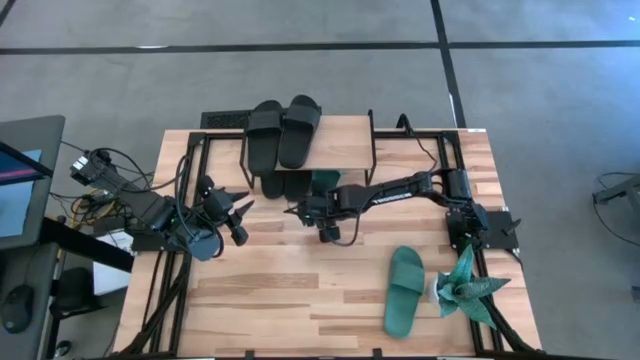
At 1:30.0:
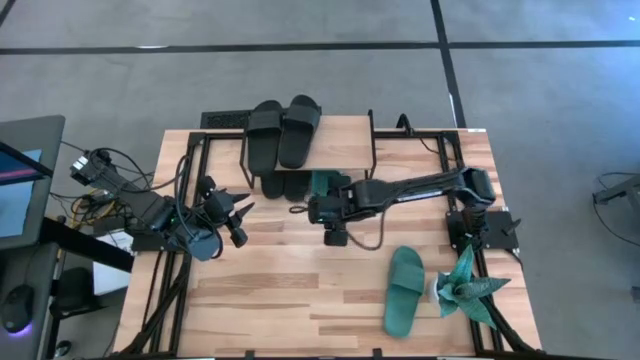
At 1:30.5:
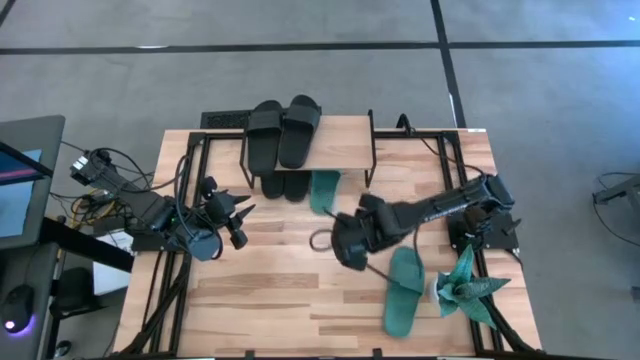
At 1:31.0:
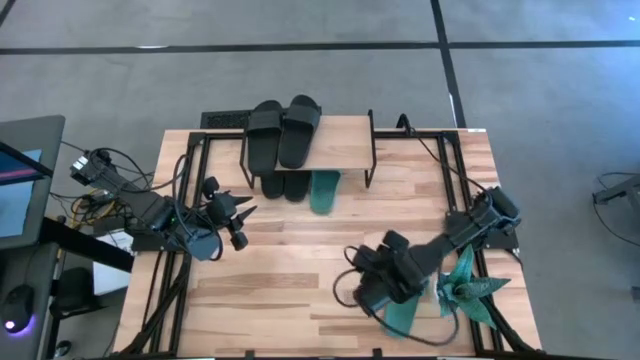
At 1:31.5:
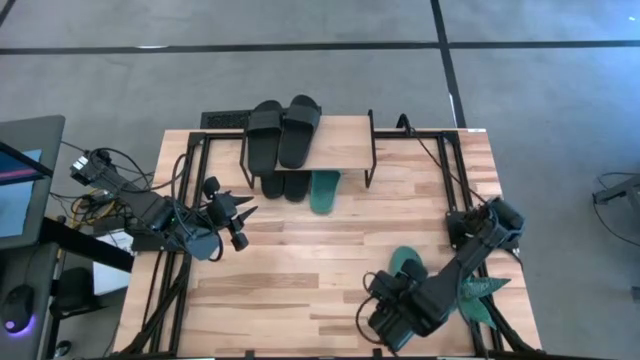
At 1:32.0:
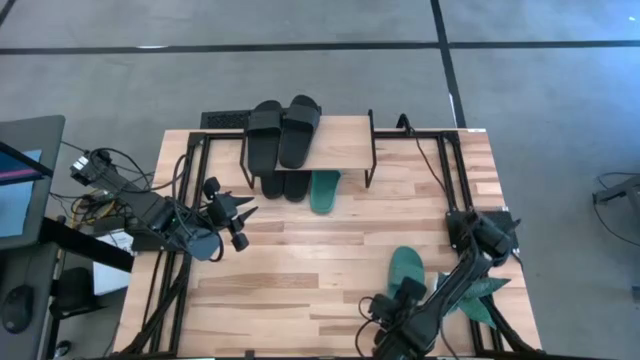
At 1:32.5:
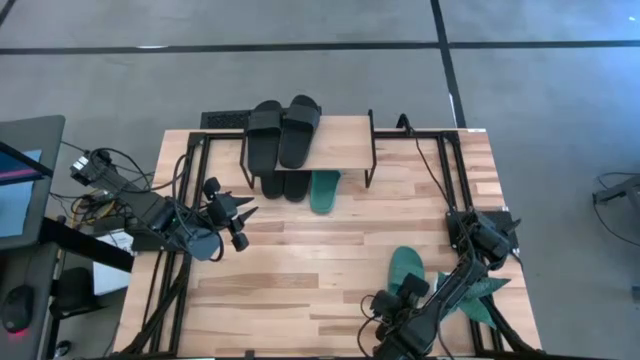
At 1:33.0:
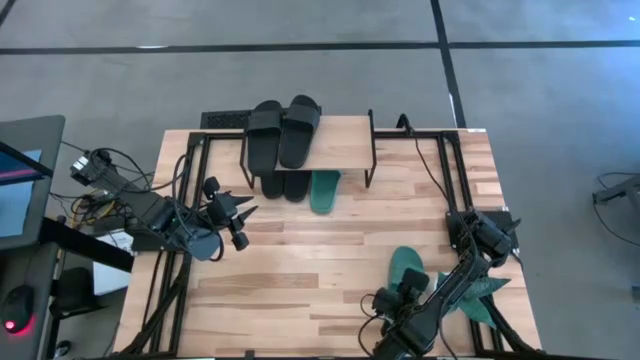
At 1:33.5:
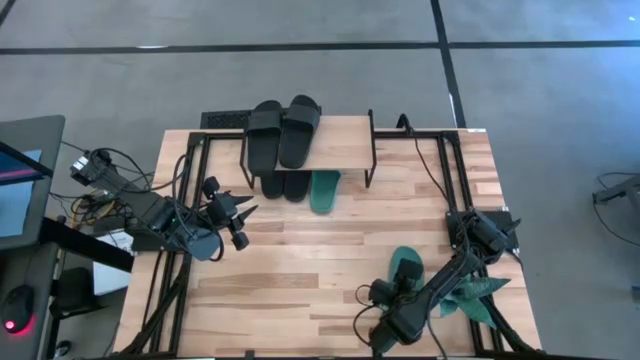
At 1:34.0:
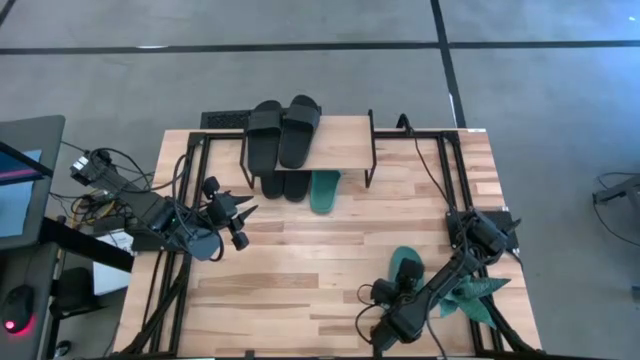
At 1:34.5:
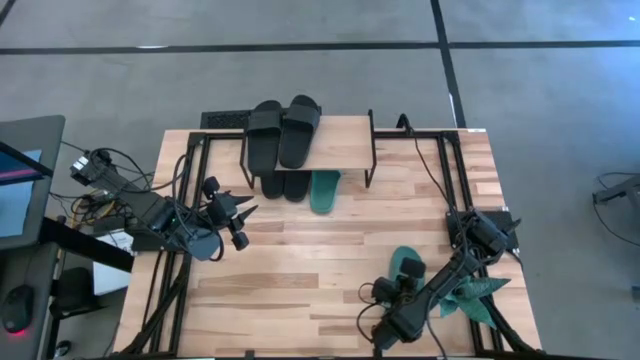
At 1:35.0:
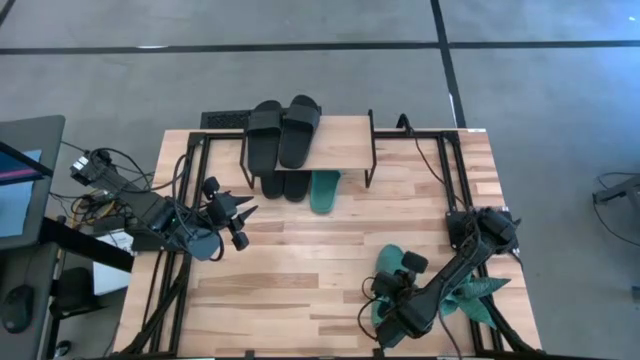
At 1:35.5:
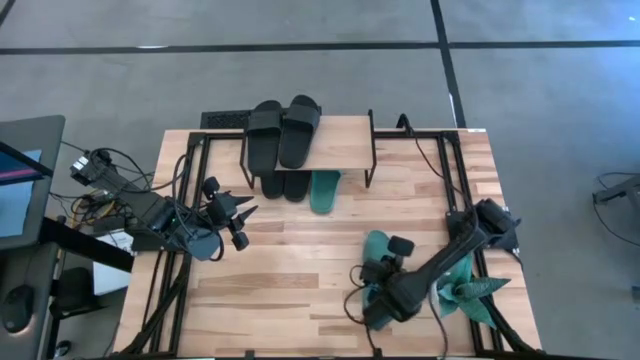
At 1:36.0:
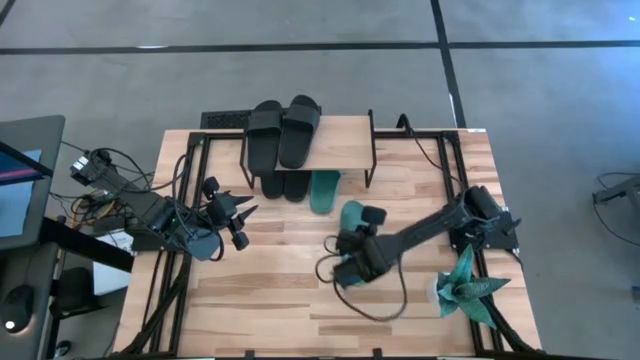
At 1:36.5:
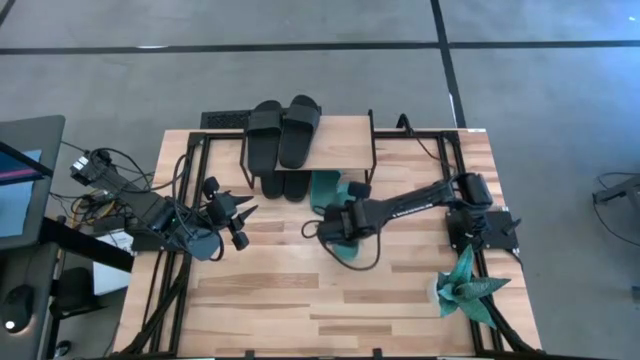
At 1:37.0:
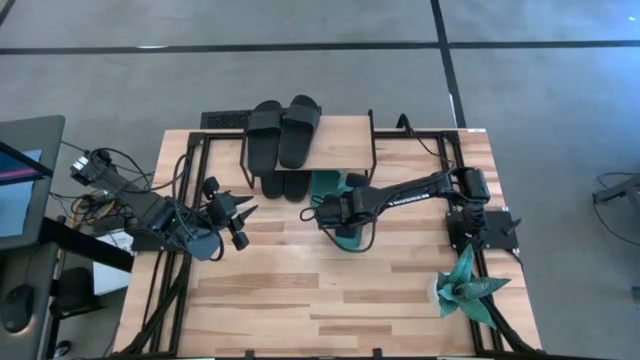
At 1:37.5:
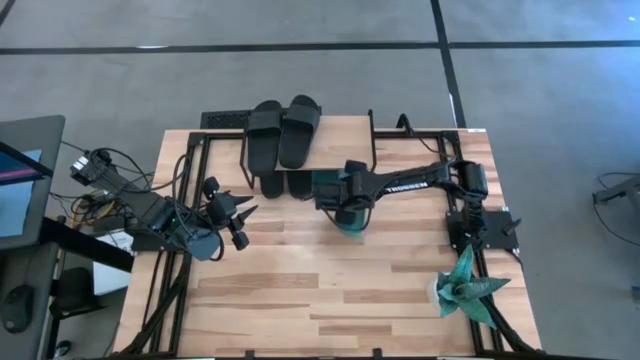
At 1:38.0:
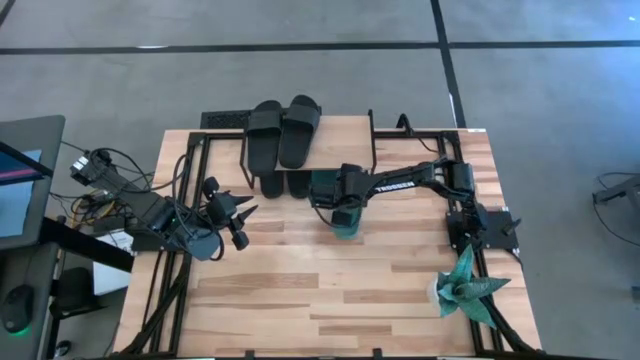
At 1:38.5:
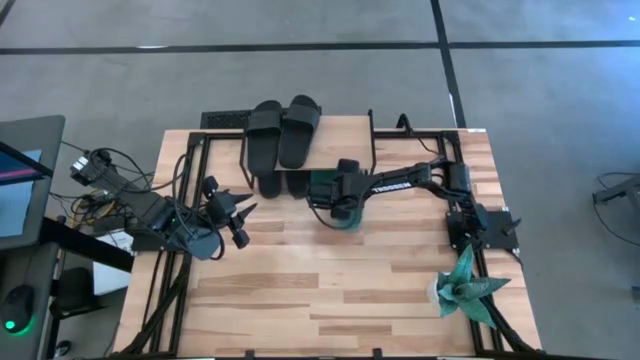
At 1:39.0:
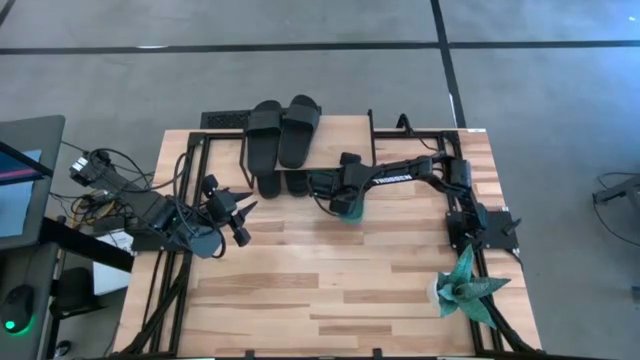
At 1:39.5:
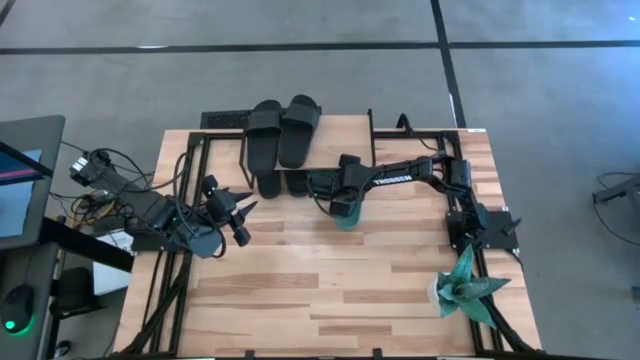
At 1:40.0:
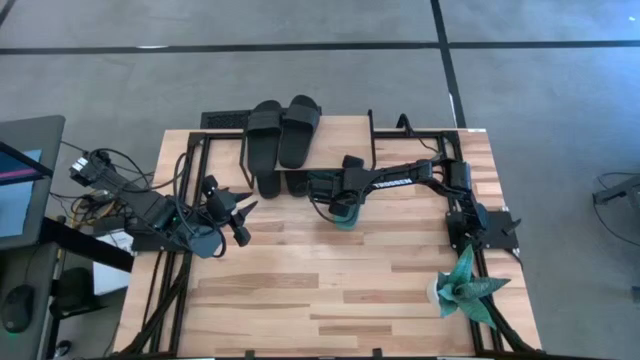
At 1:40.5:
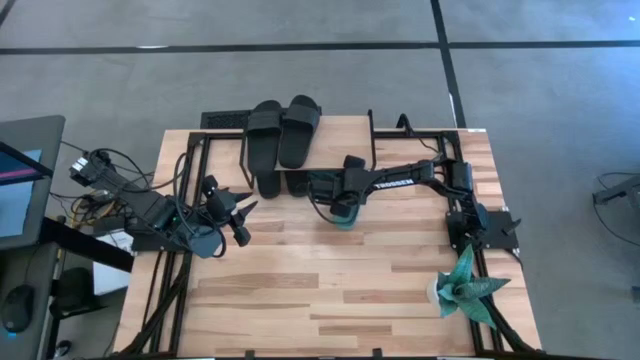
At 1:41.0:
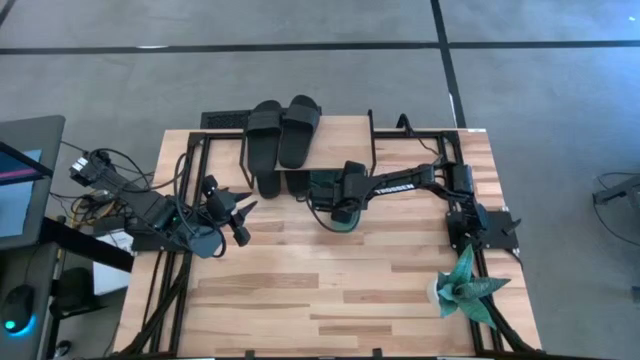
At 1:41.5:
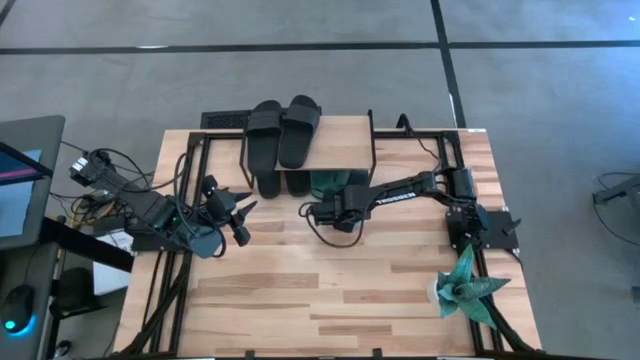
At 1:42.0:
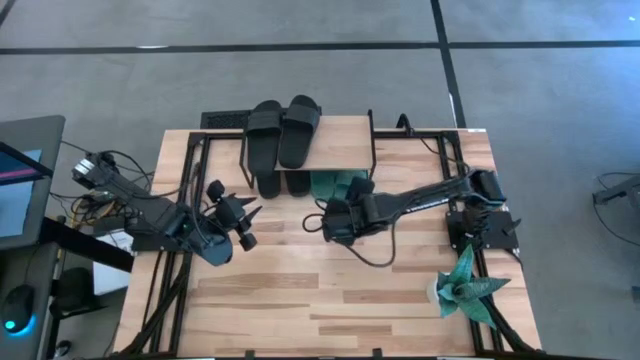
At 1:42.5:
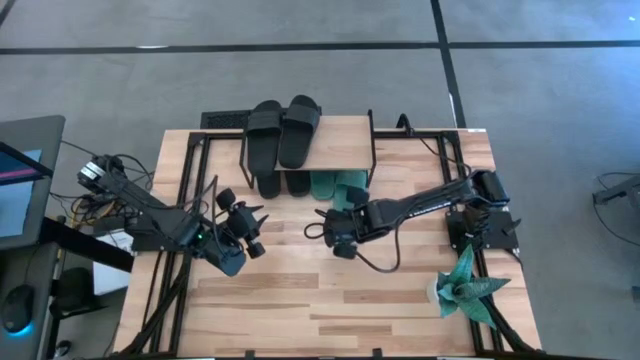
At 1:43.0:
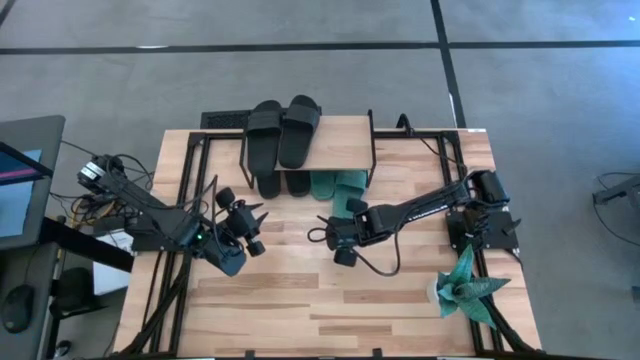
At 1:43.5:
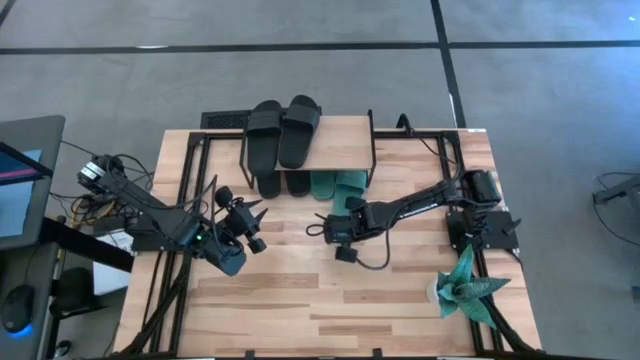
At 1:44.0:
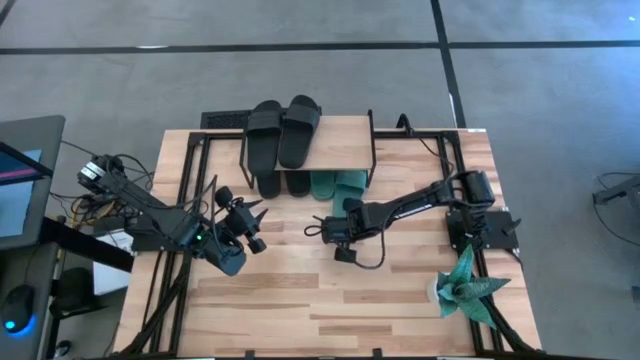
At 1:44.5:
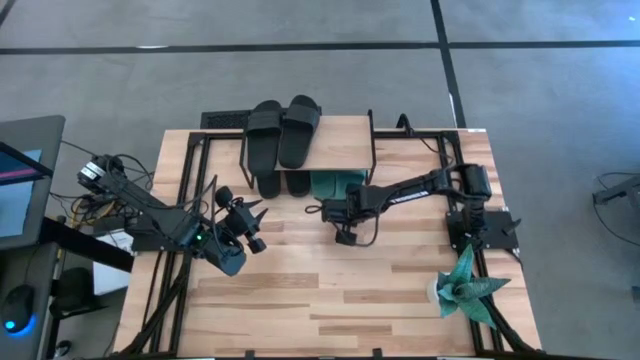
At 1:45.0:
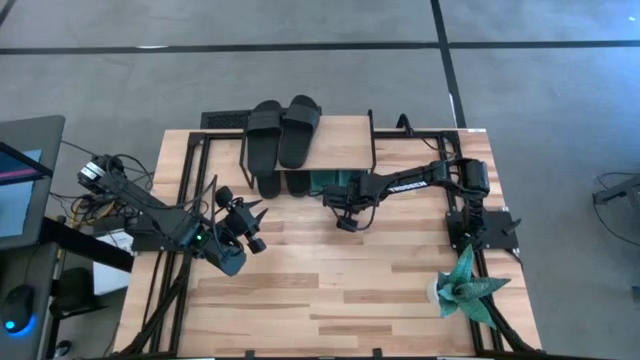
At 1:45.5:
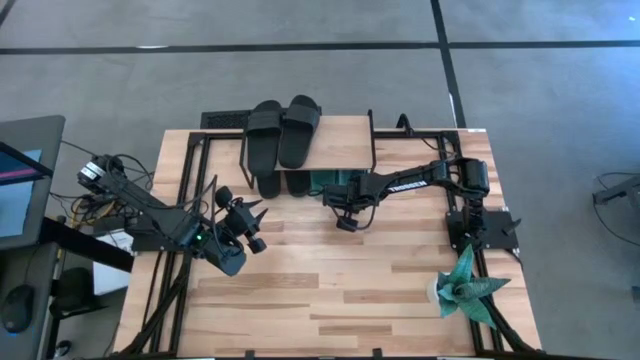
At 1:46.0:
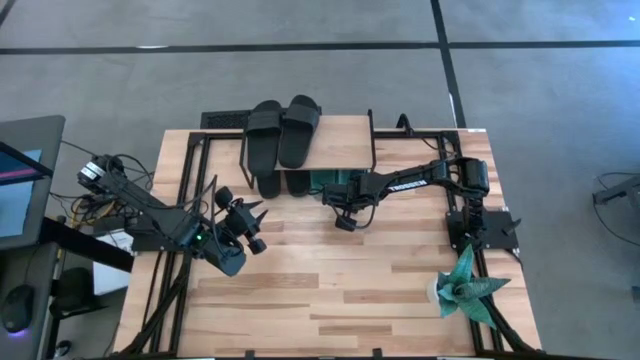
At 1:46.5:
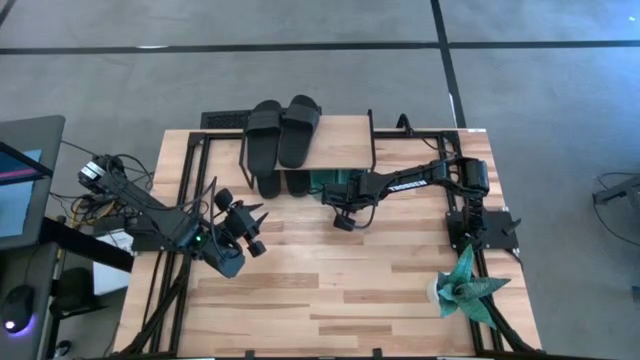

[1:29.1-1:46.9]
Task: Pick and place slides into the shelf
Put the green slipper under the shelf

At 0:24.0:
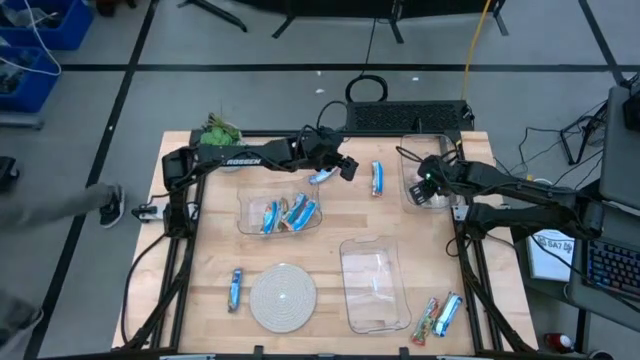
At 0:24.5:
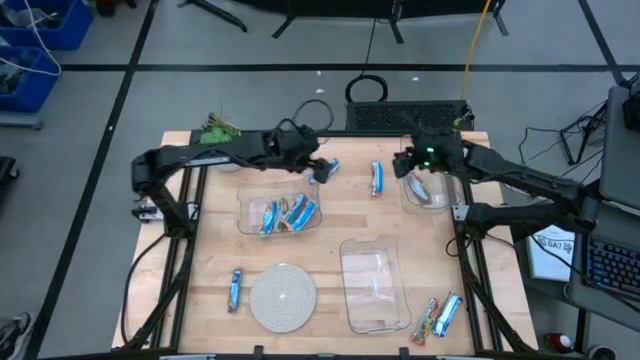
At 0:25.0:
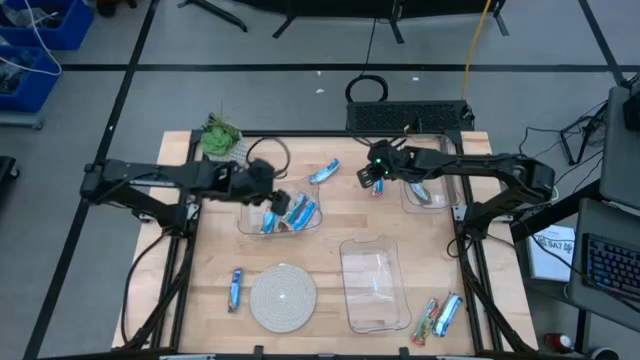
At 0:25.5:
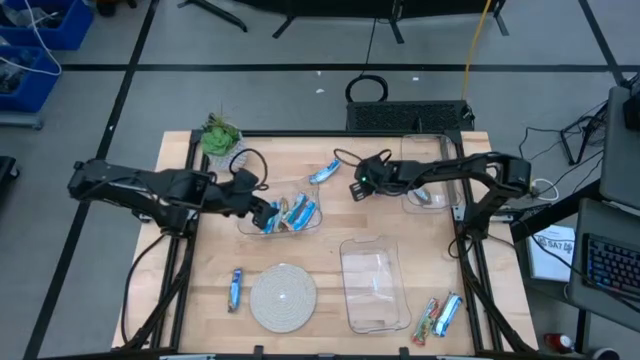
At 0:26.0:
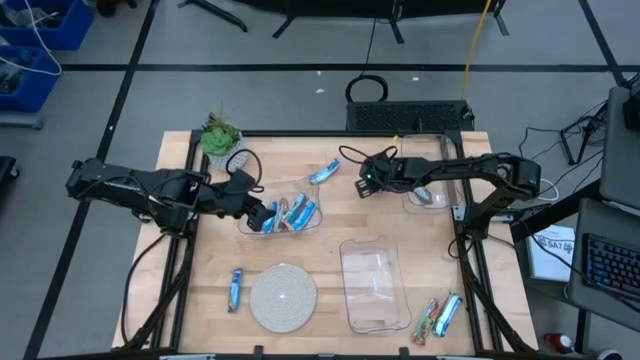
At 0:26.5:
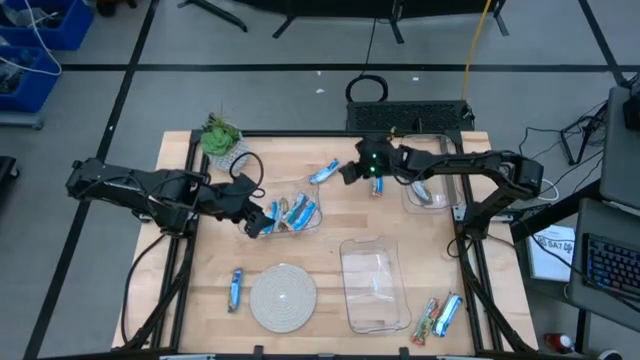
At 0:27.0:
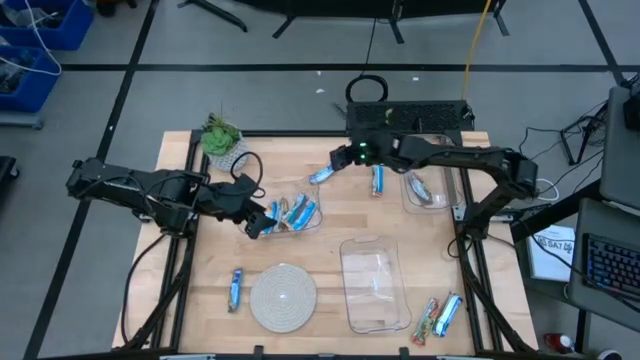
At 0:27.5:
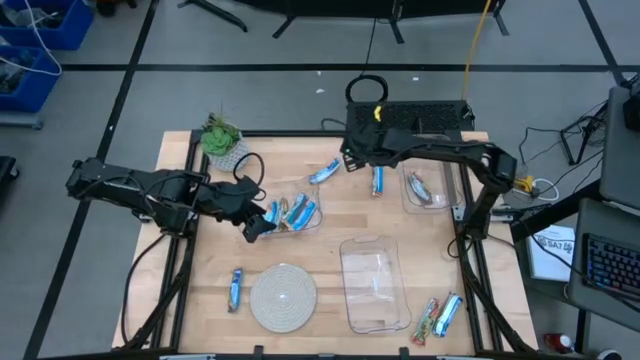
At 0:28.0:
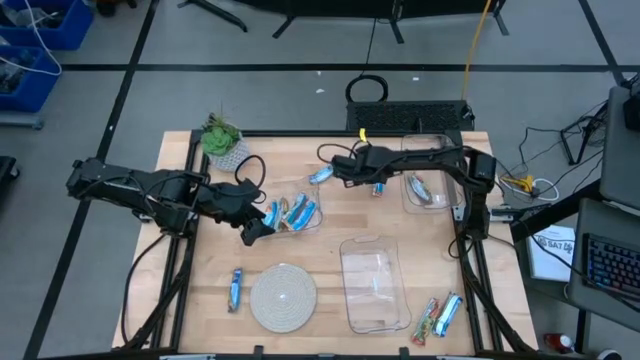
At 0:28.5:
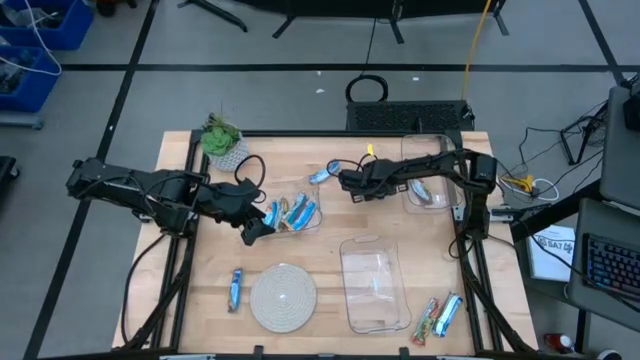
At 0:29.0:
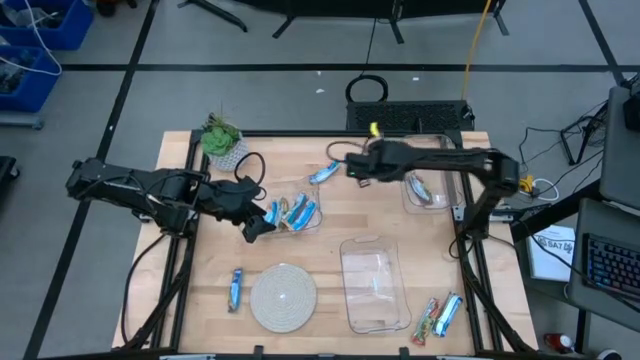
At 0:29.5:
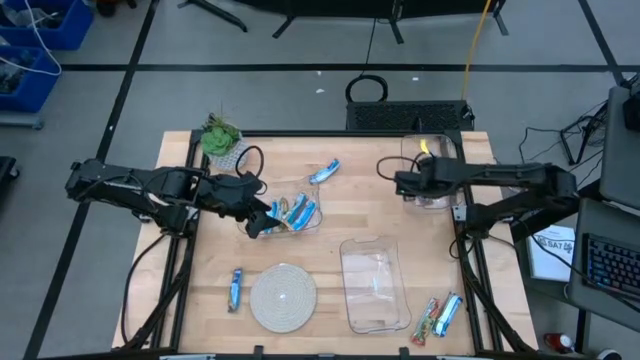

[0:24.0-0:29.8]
Task: Pick and place Granola Bars by type
Put the top red granola bar into the top right transparent bin
